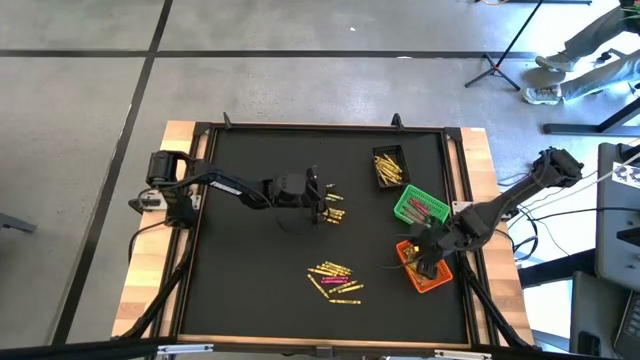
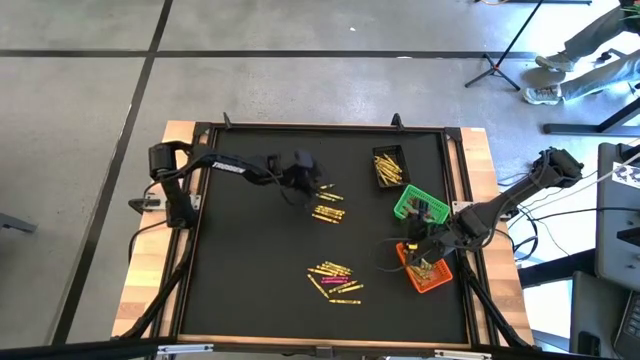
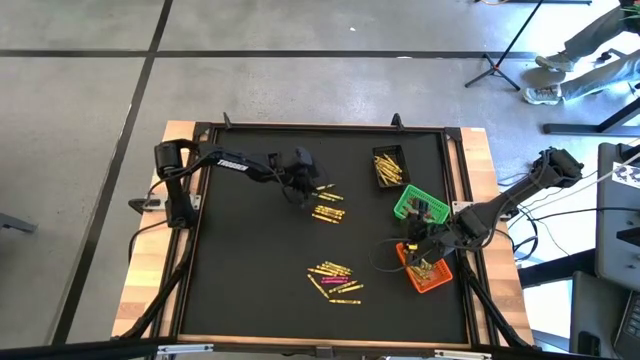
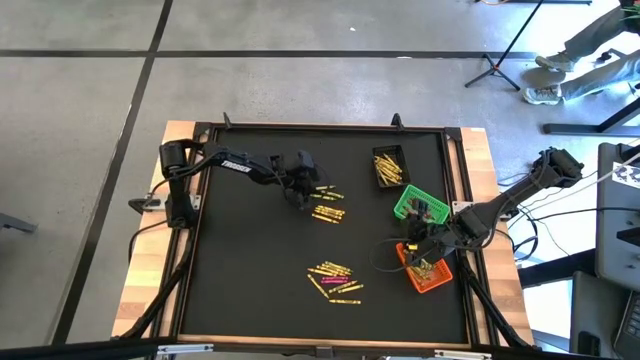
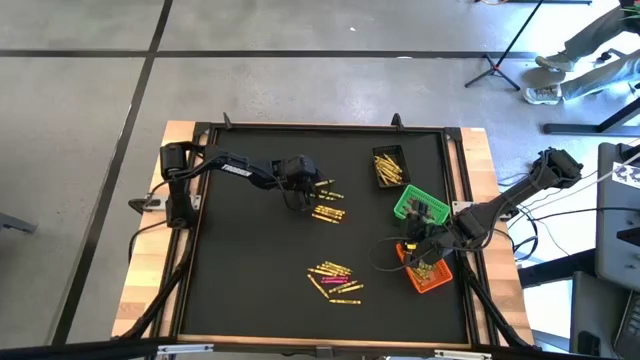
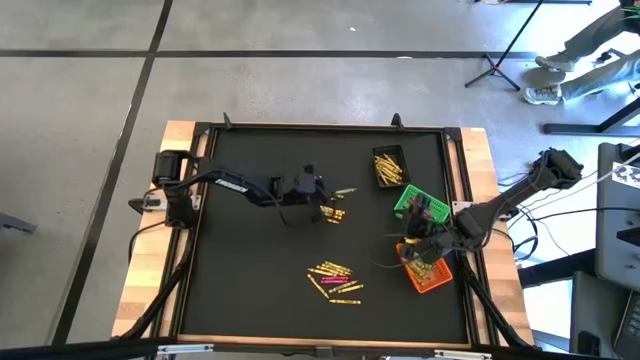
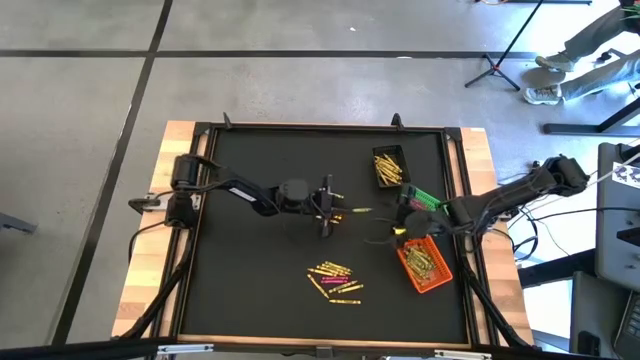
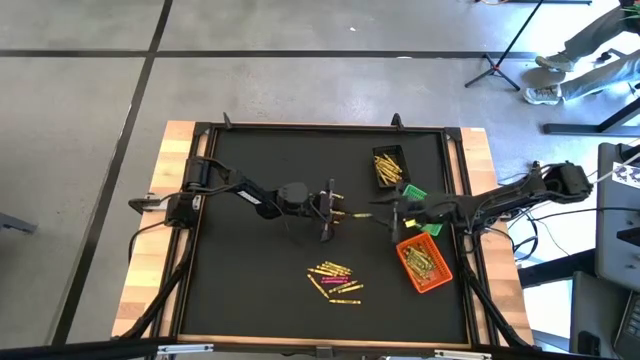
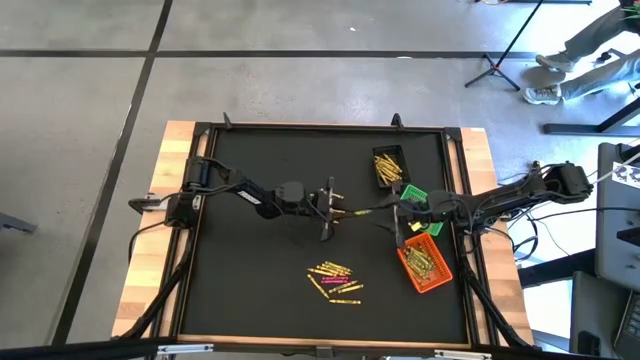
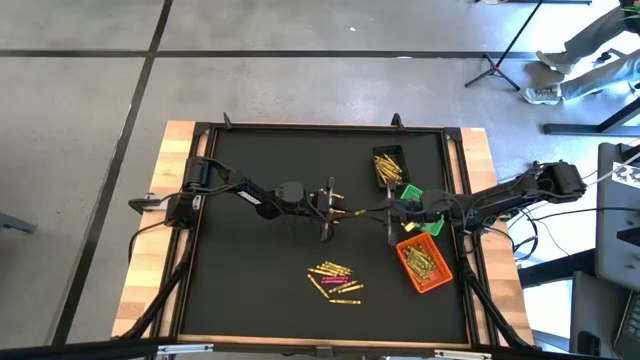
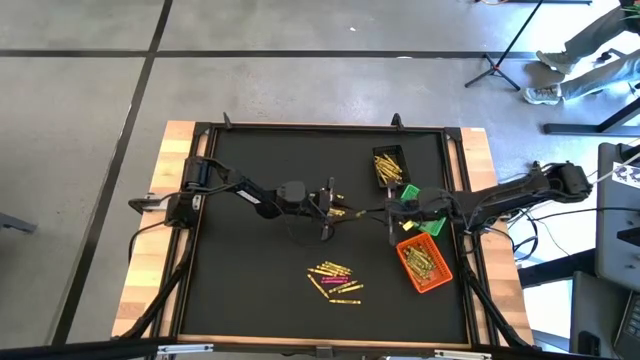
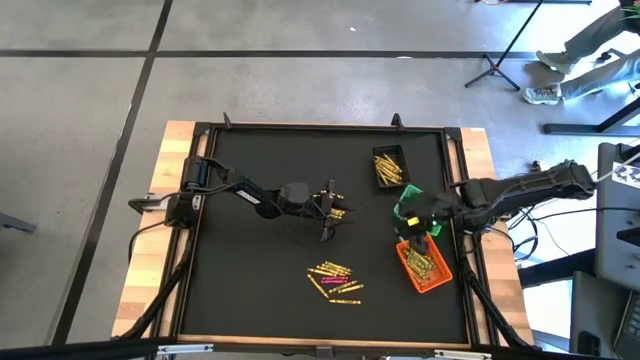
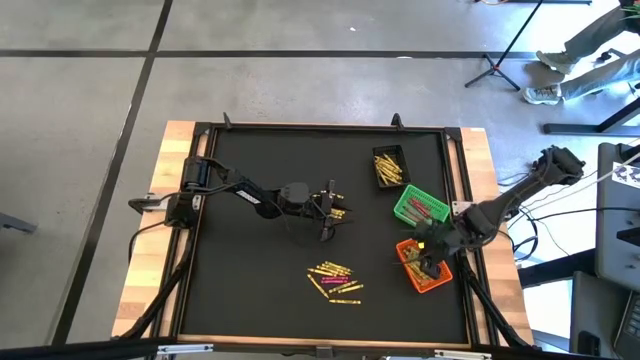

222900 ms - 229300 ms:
Task: Sort crayons
Put the green crayon into the orange basket

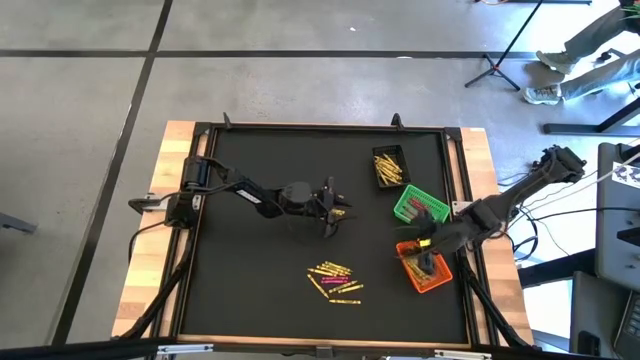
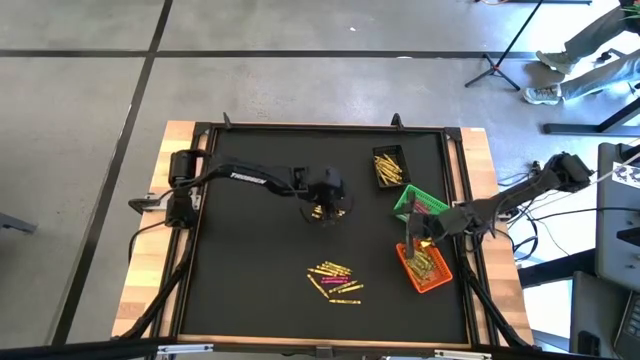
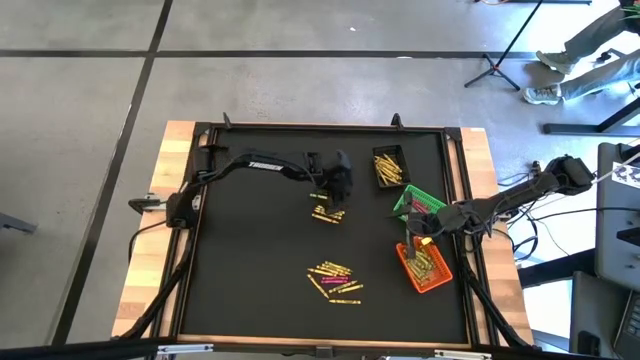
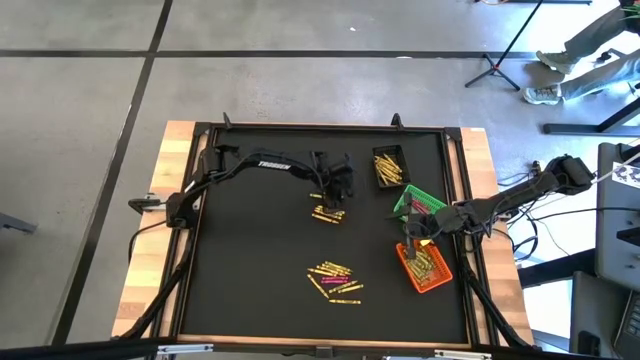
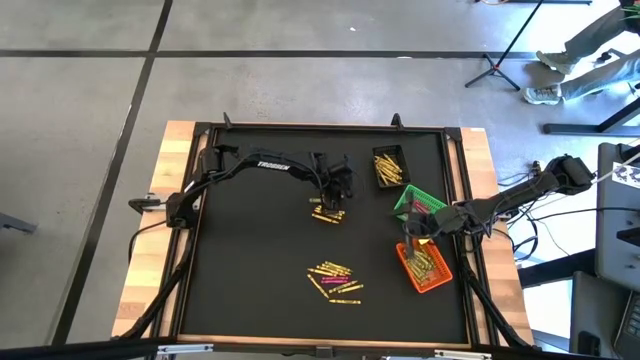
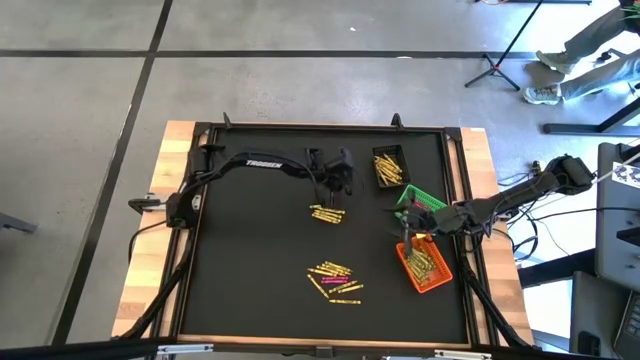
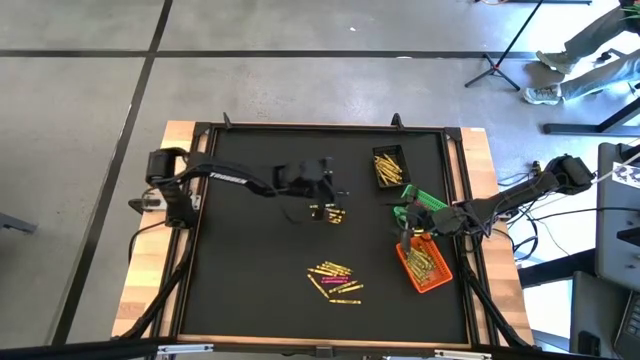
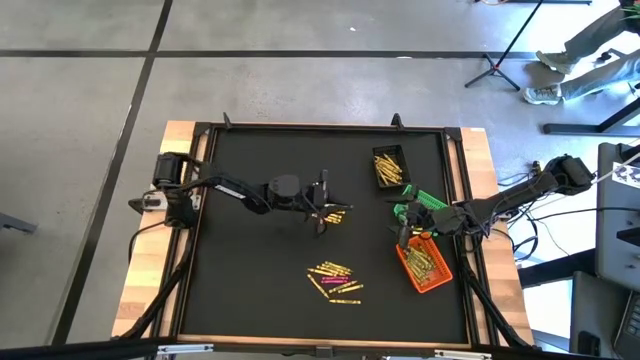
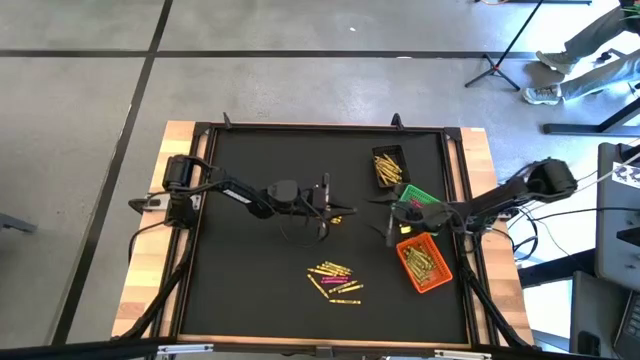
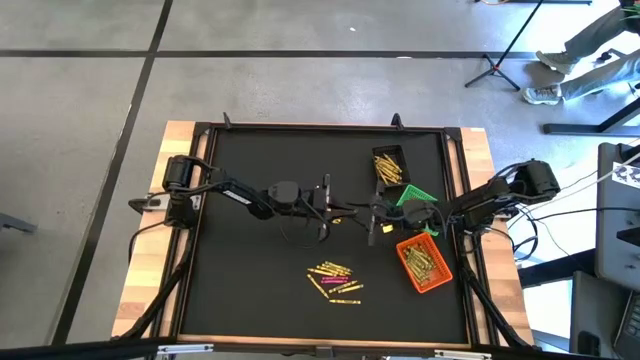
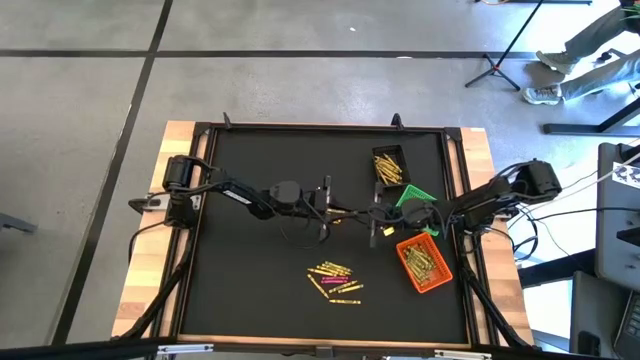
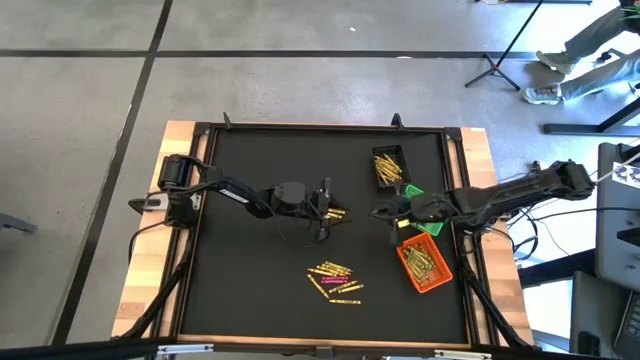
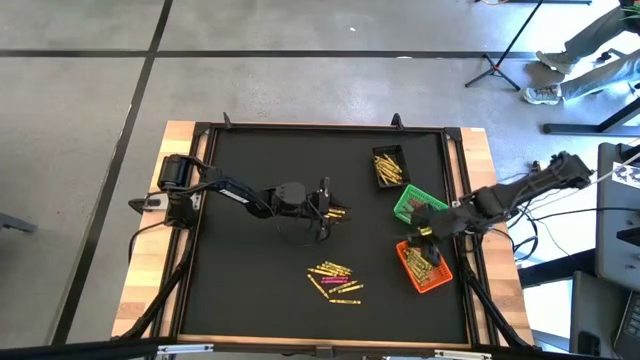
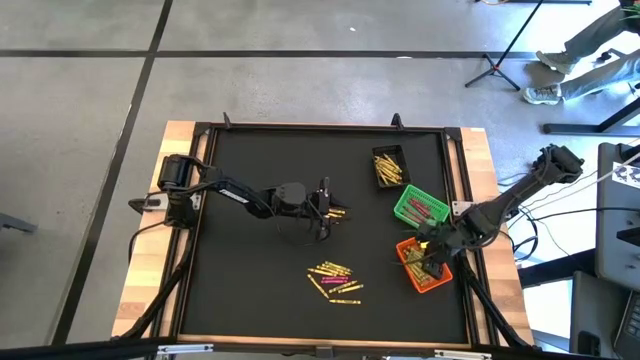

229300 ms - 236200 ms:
Put the green crayon into the orange basket

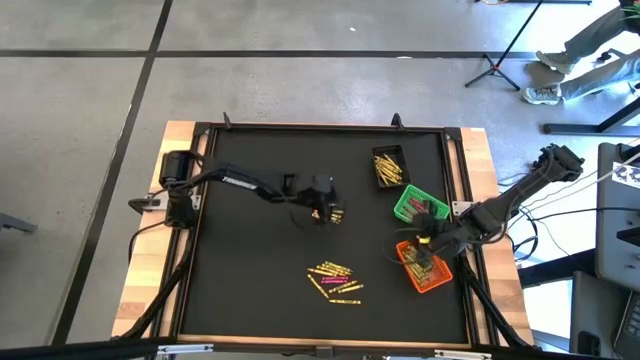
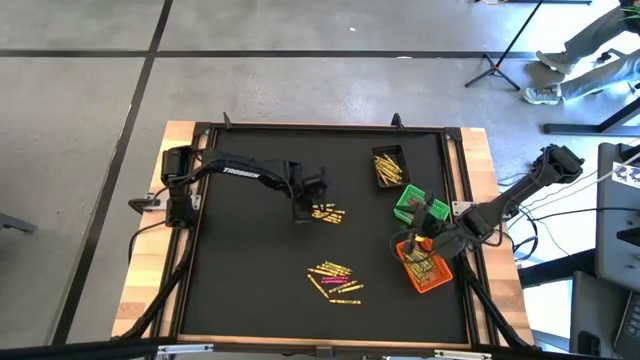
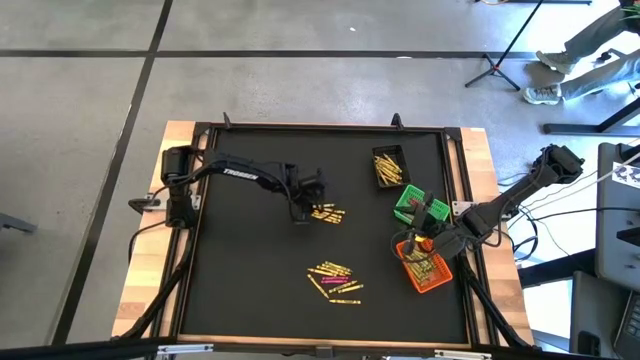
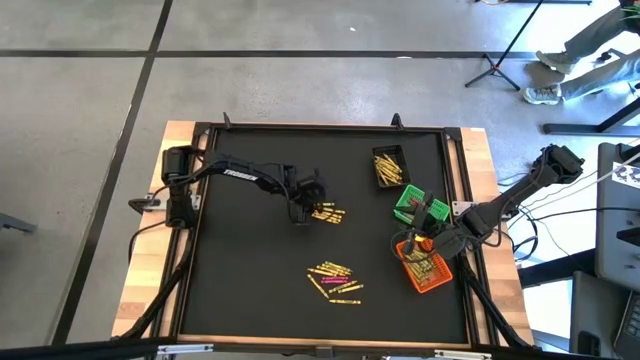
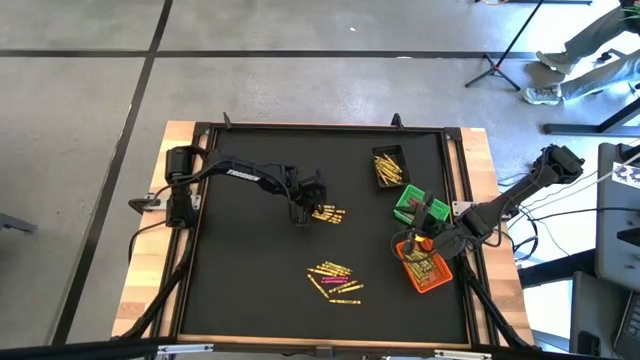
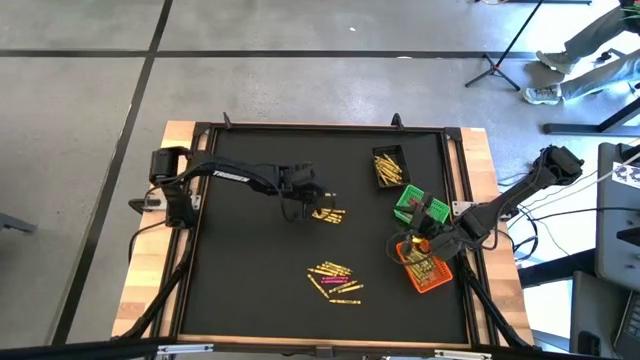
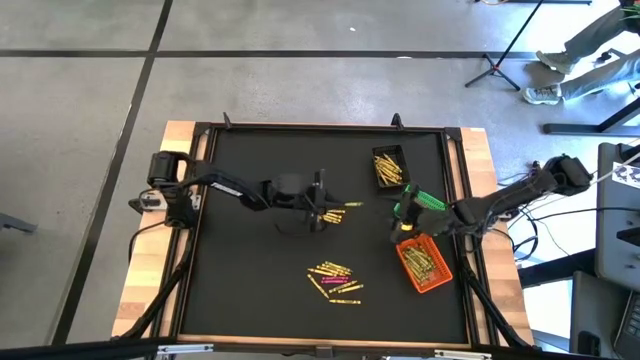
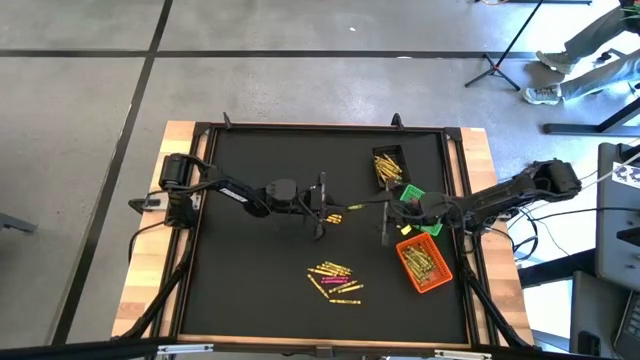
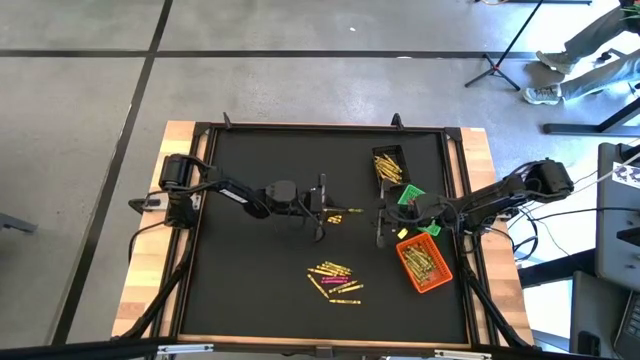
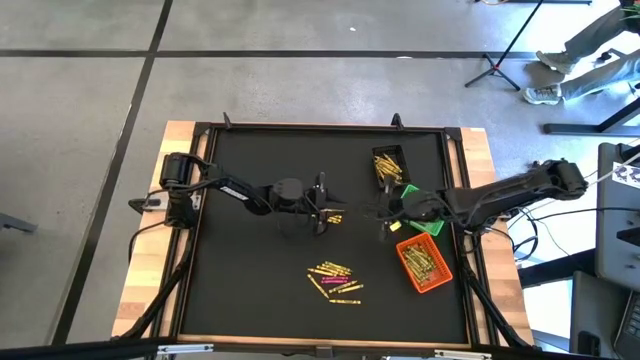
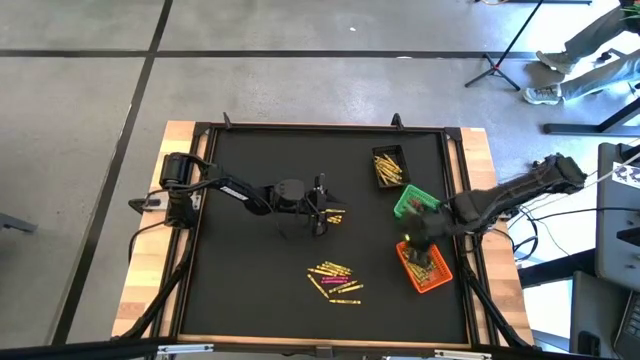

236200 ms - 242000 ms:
Put the green crayon into the orange basket

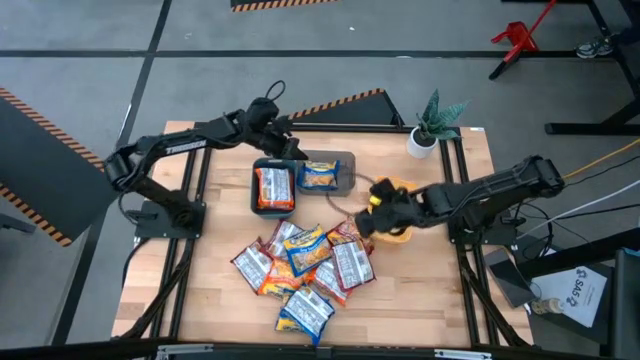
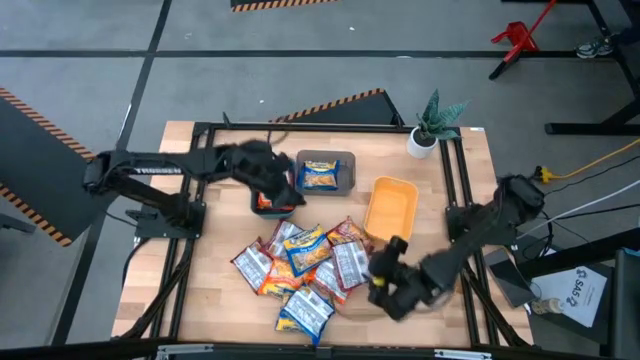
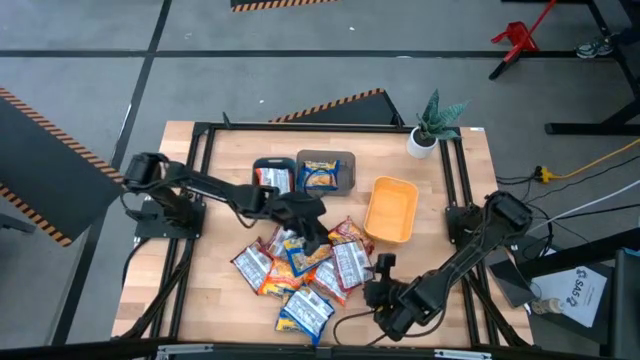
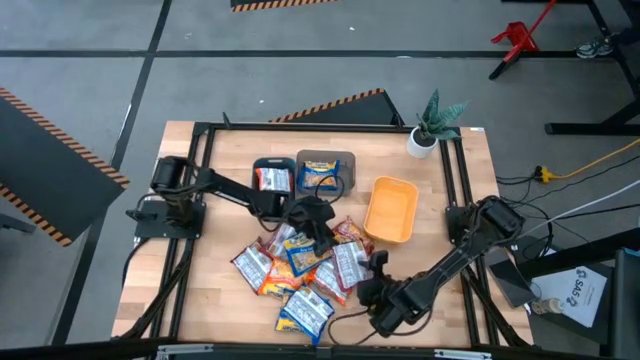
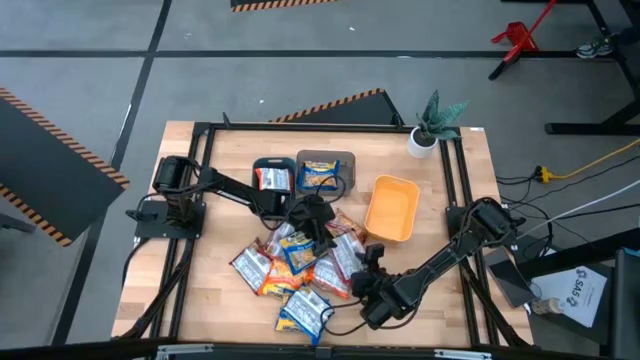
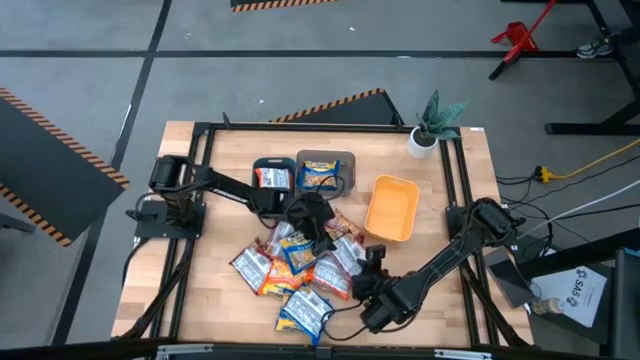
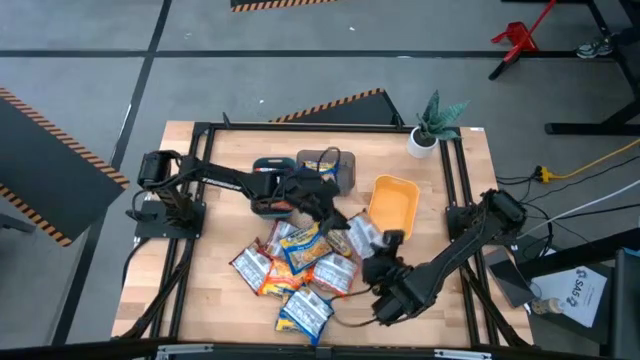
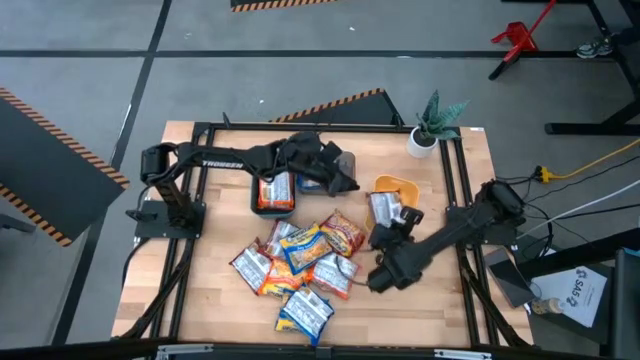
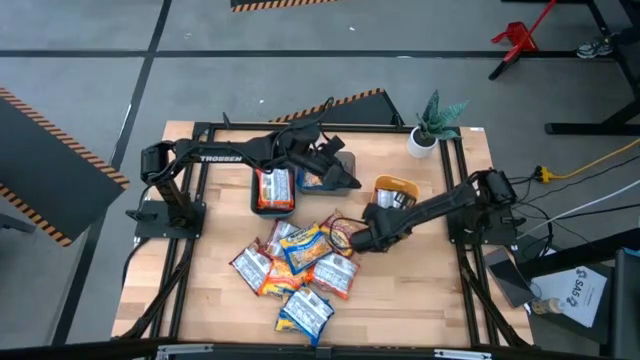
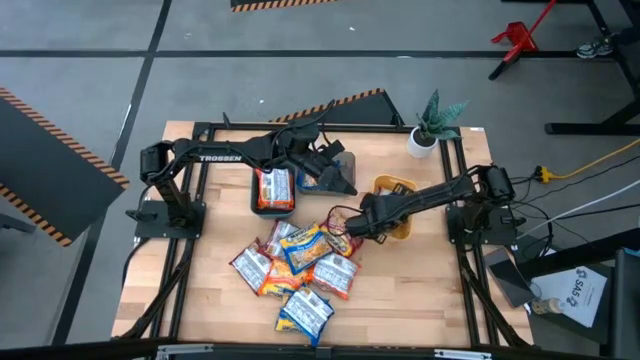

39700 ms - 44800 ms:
Task: Sort Maruchan noodles
Put the red noodle pack into the yellow bin
